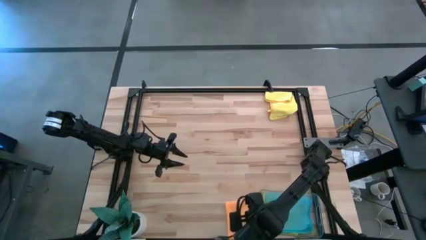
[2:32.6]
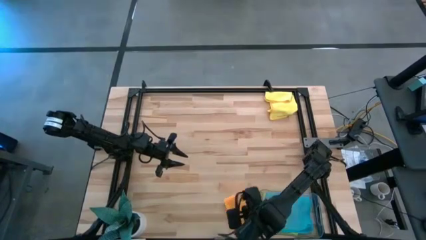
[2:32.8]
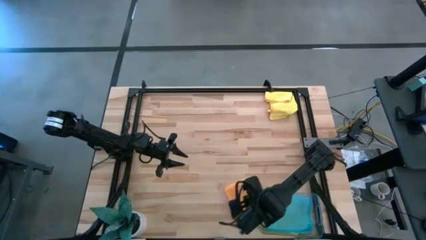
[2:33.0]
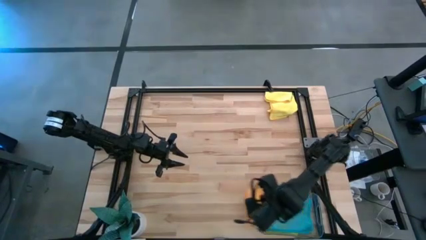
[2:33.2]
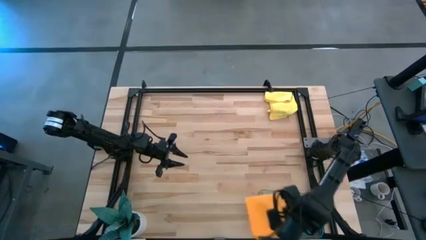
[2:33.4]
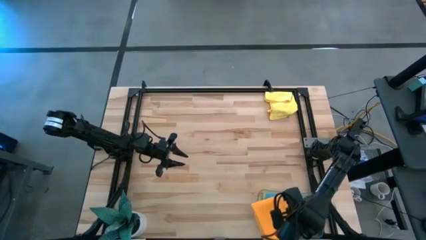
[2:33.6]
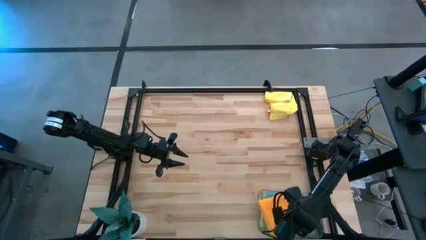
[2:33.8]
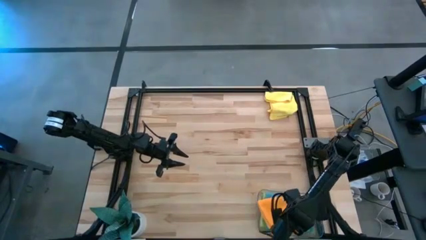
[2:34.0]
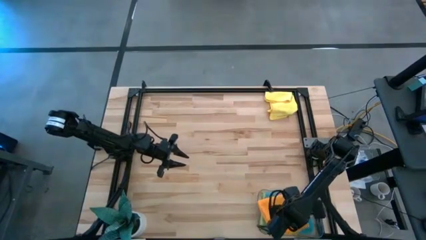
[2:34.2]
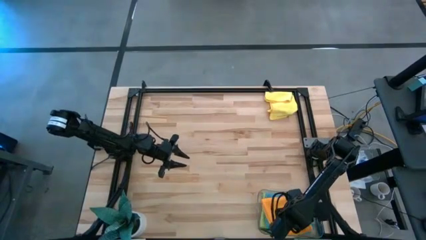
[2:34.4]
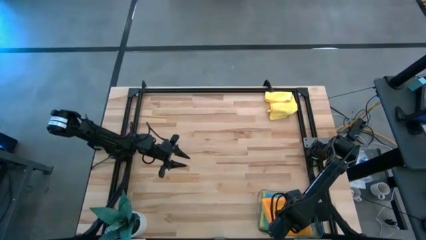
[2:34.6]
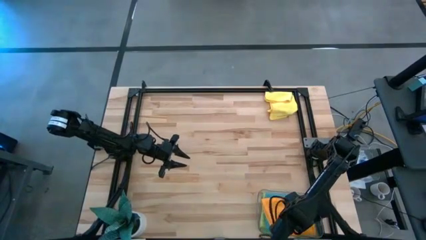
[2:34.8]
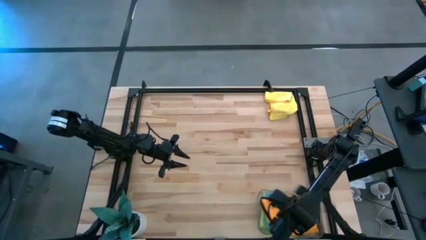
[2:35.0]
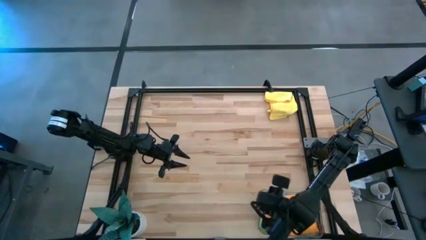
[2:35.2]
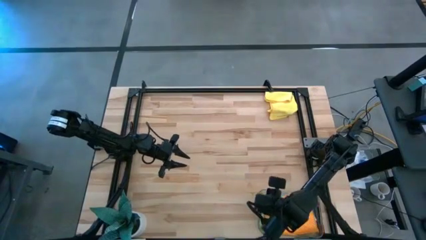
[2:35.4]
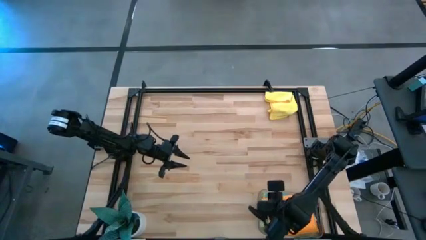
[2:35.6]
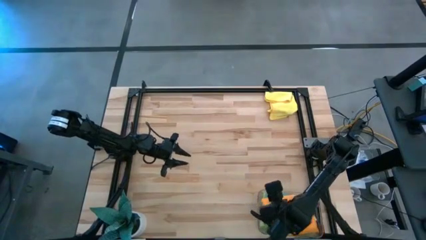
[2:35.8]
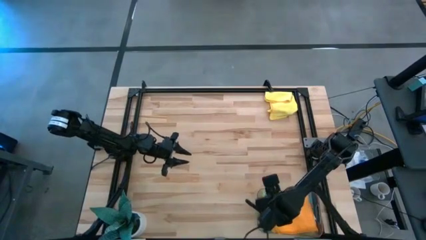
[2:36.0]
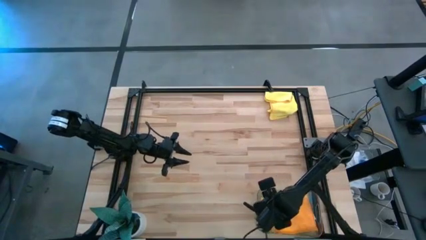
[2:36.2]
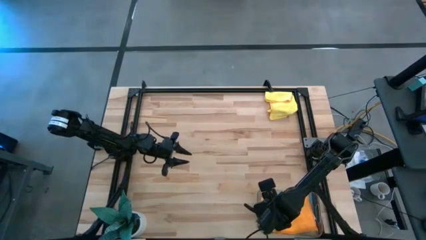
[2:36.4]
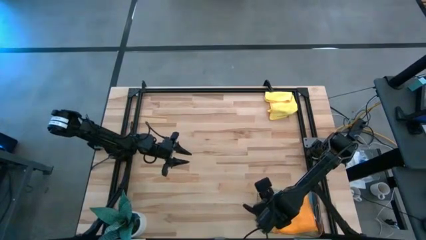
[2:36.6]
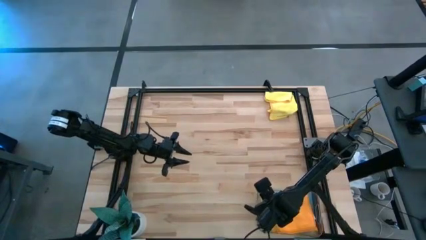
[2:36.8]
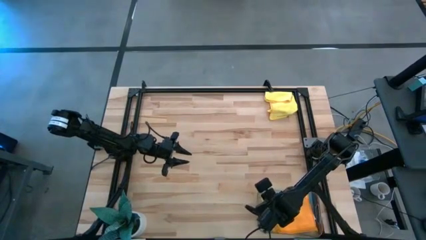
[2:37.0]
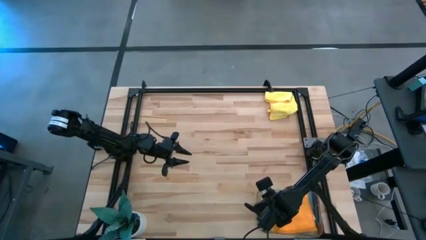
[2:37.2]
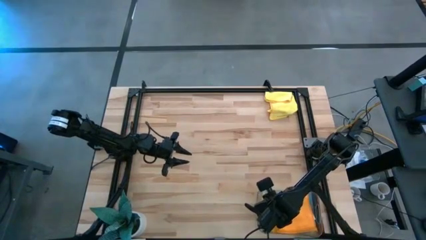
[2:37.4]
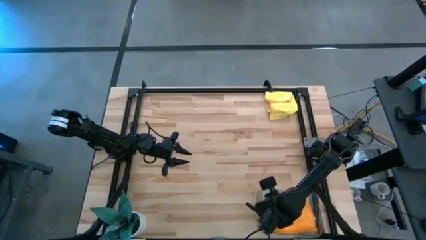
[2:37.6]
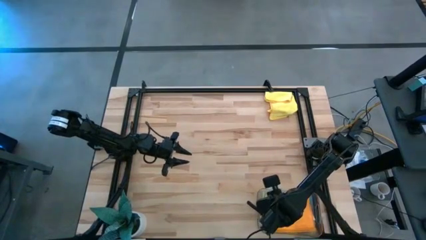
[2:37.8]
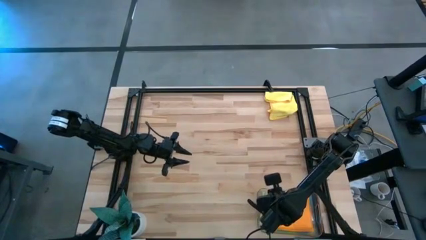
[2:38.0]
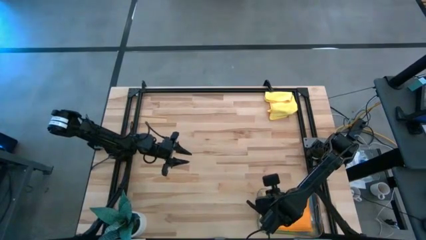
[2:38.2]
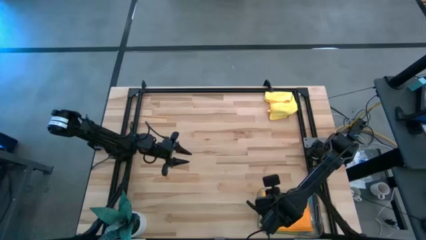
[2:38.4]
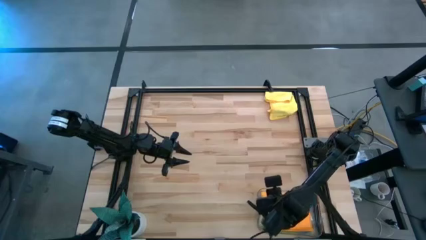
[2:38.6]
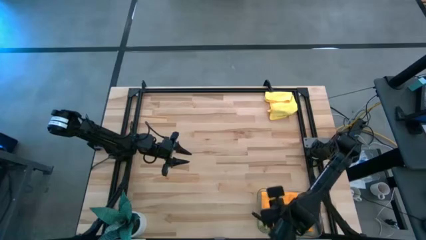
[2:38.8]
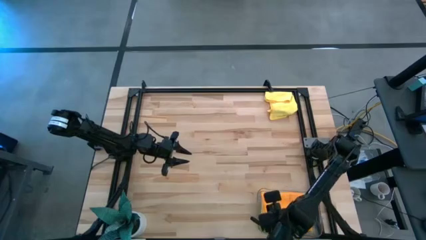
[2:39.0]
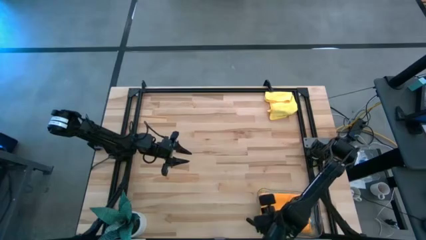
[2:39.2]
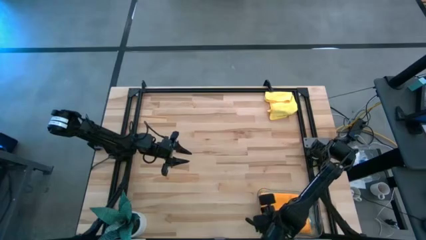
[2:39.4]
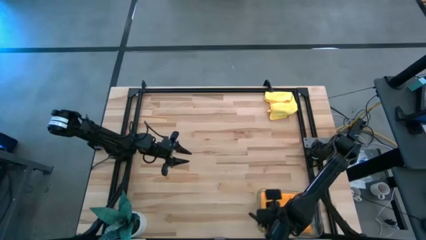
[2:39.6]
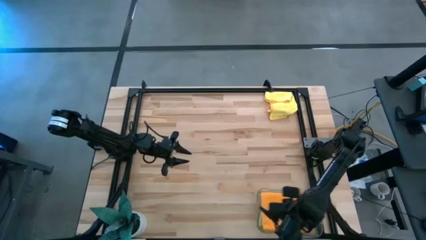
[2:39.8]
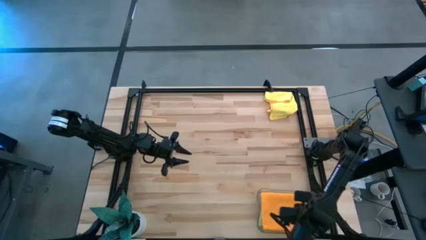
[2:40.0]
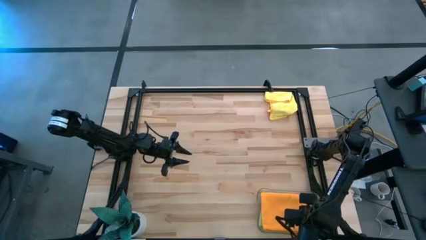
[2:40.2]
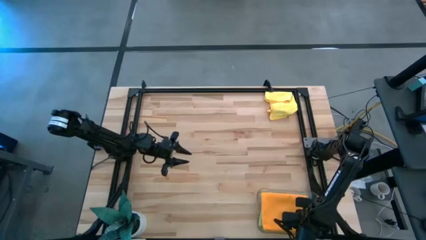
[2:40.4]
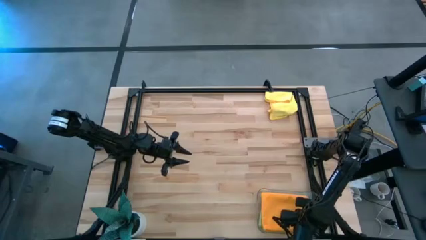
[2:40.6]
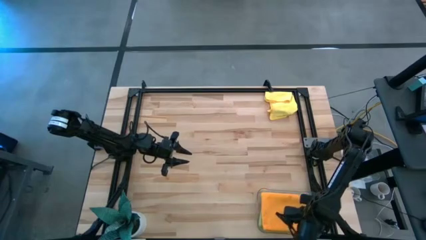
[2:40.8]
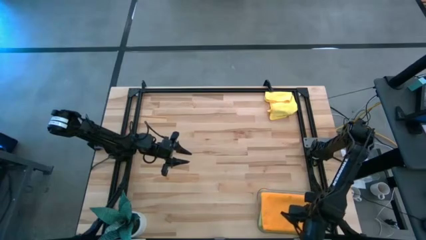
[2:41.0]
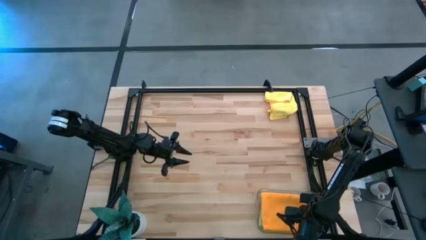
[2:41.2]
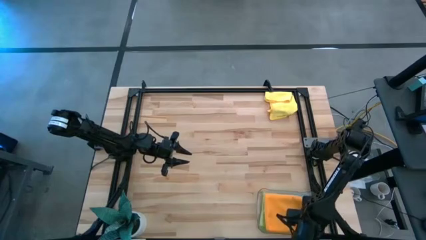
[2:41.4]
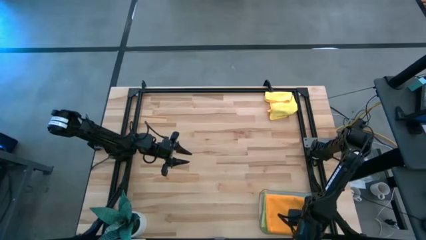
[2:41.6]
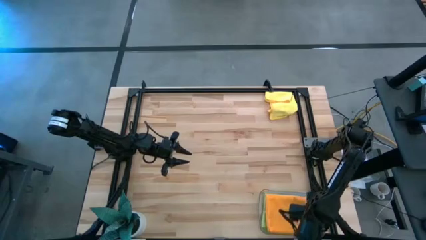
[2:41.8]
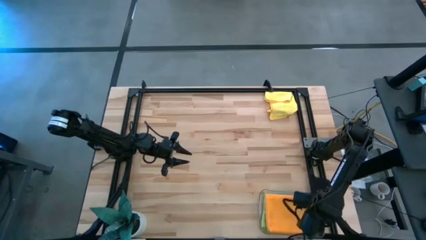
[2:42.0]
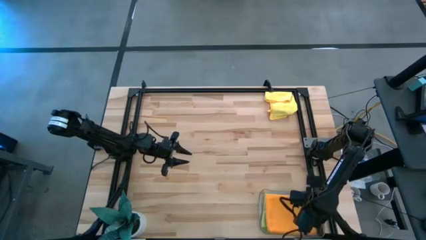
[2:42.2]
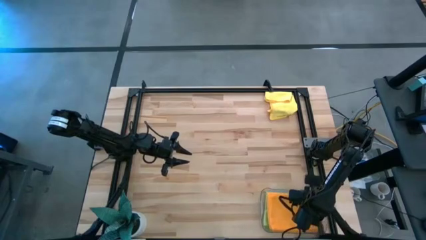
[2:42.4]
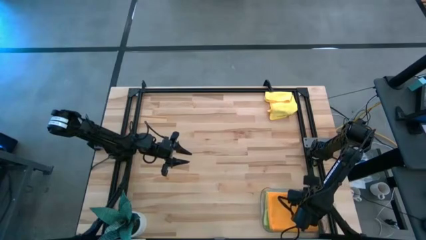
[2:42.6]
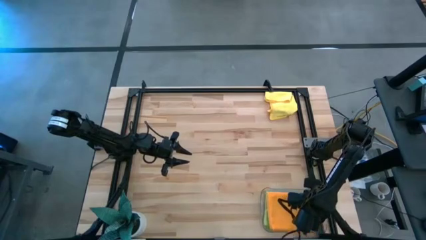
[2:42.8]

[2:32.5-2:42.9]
Task: Fold microfiber towels
Put the orange towel into the transparent bin

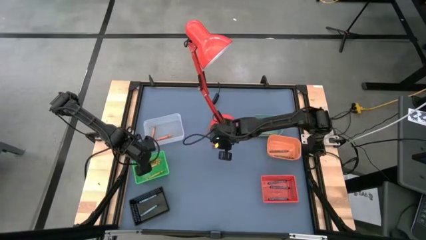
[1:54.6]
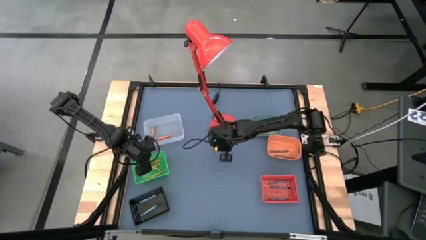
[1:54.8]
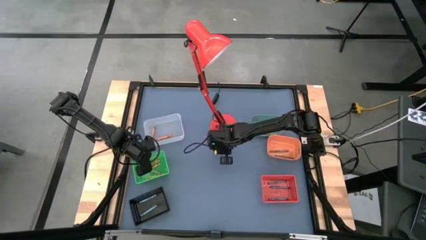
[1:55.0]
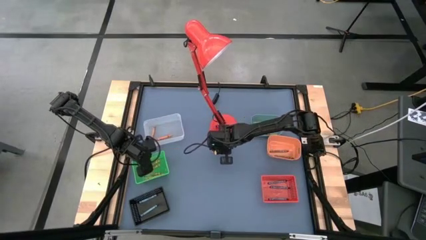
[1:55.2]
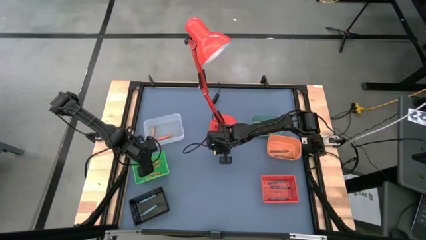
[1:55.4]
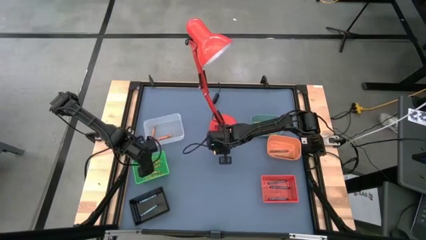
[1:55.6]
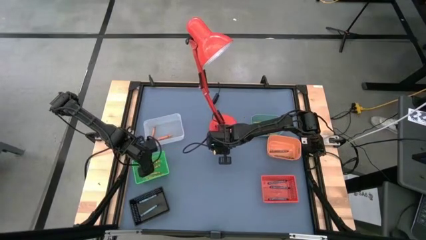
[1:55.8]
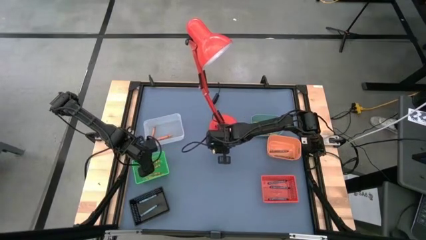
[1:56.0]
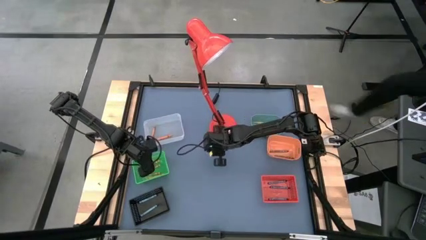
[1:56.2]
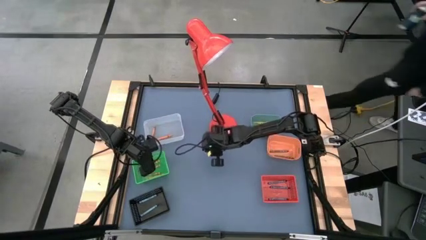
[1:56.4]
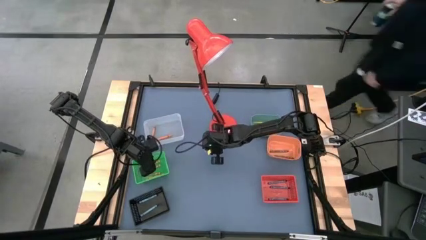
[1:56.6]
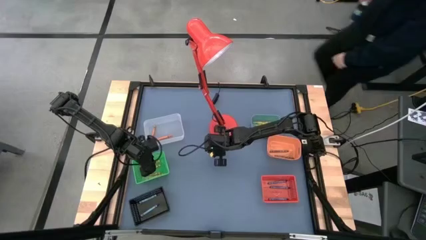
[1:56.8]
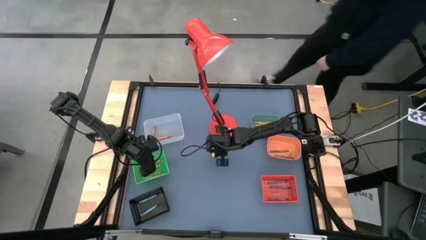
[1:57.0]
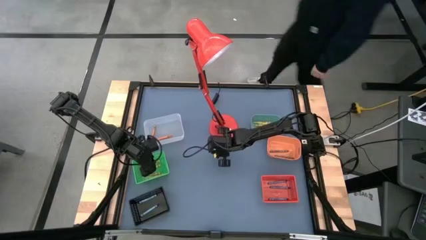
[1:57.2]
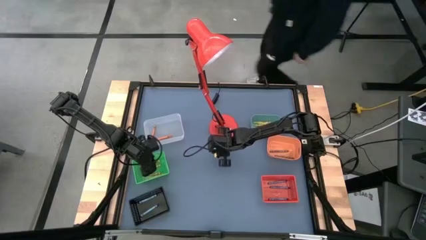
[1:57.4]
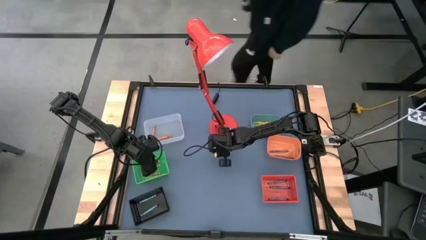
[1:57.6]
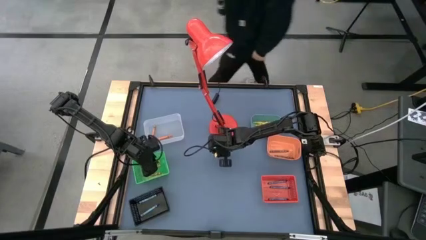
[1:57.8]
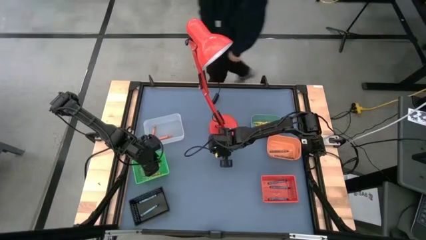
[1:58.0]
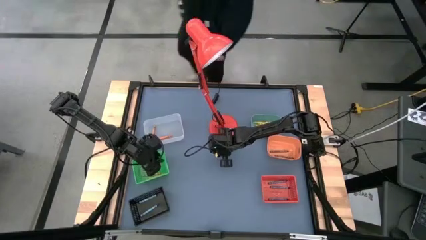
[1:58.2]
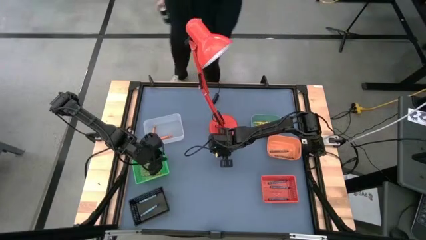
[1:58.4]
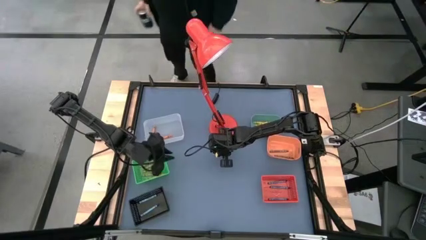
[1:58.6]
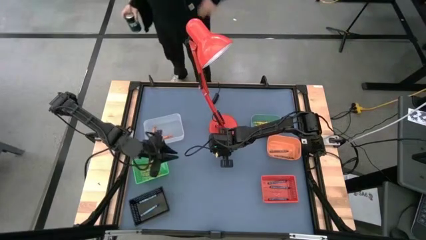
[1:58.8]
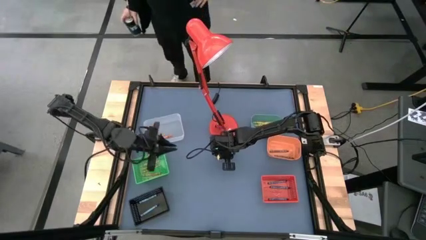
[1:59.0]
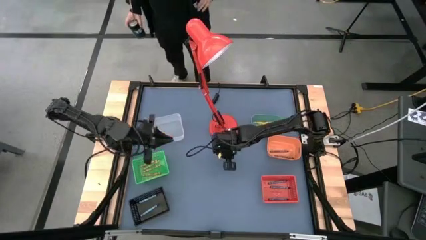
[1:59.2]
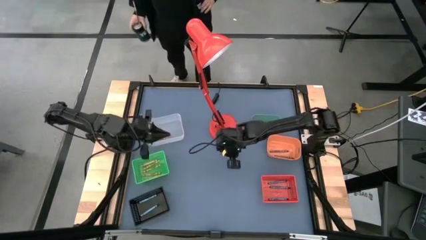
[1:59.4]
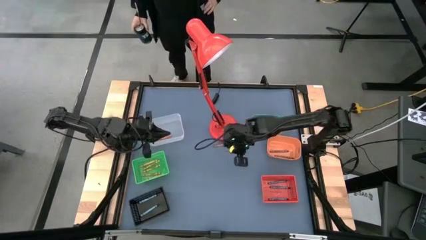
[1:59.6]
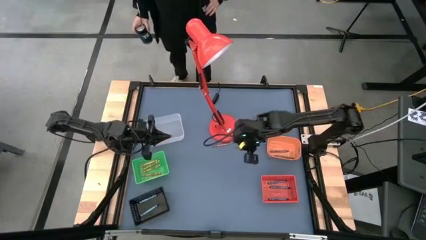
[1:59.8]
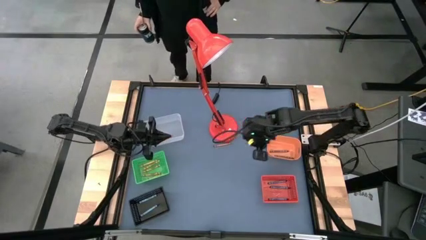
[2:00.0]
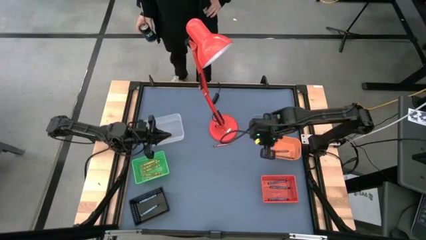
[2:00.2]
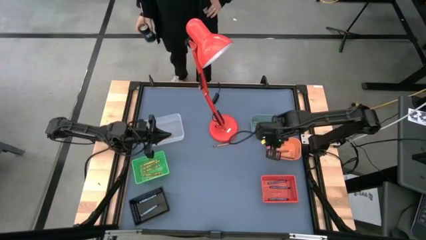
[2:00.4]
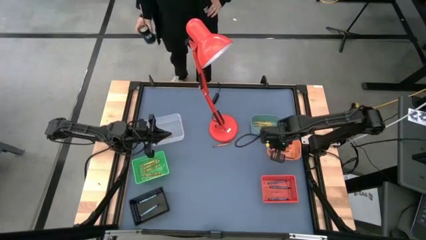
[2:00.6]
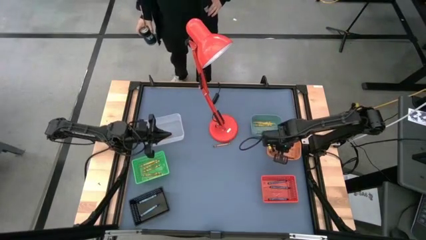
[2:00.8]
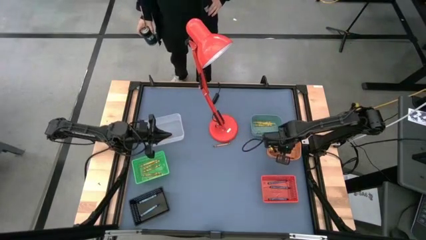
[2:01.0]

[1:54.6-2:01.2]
Task: Sort crayons
Put the brown crayon into the orange bin
